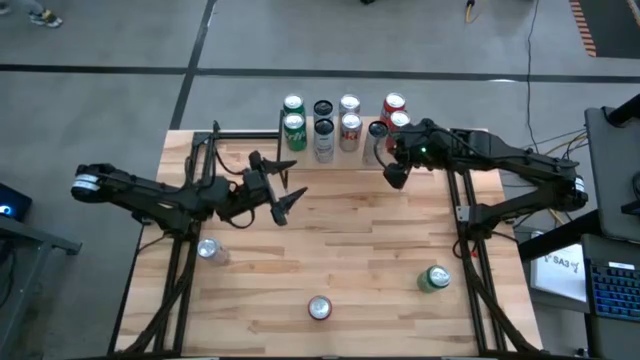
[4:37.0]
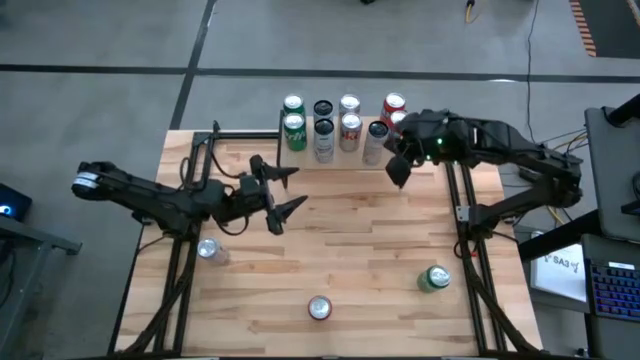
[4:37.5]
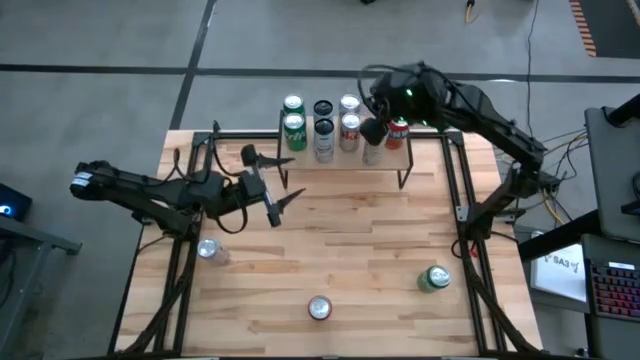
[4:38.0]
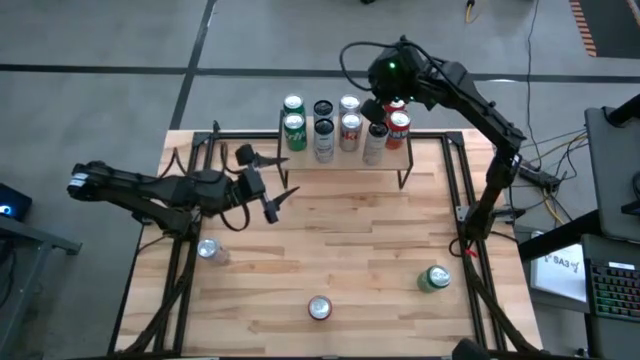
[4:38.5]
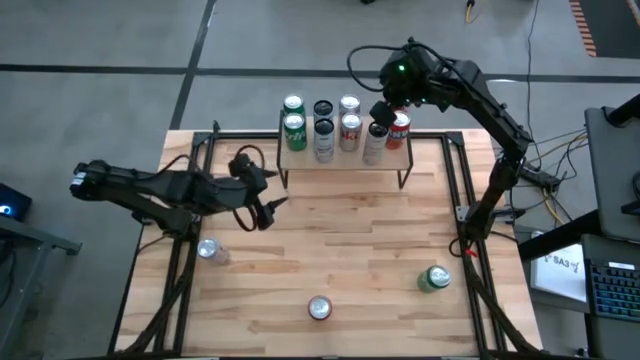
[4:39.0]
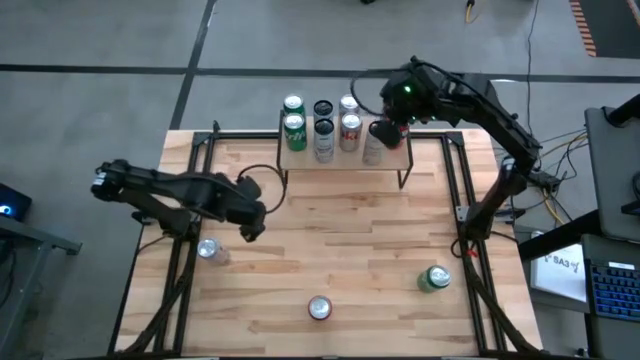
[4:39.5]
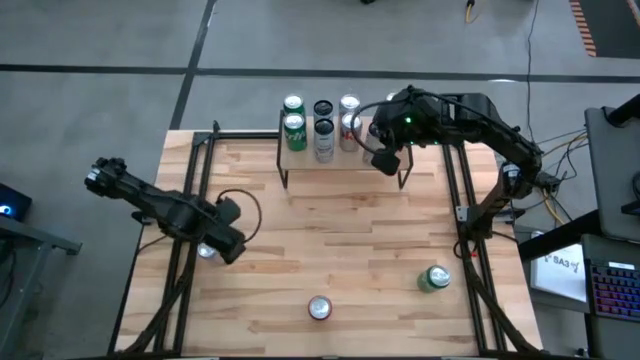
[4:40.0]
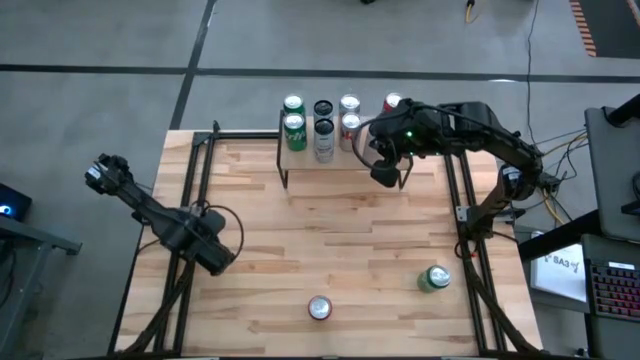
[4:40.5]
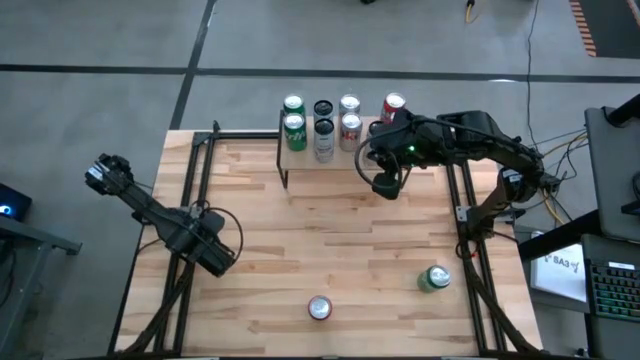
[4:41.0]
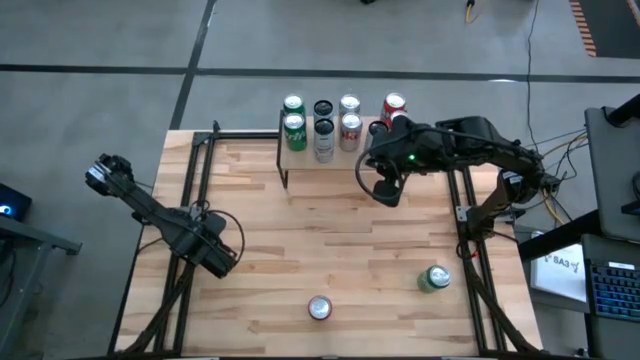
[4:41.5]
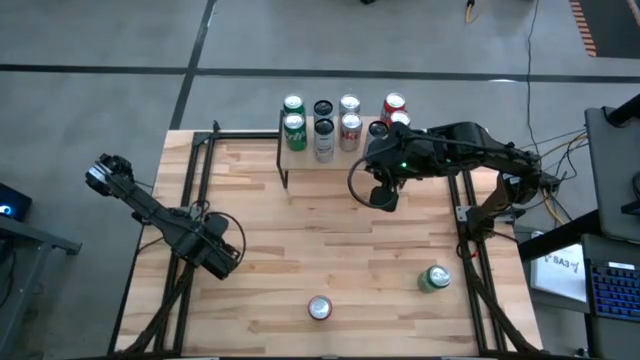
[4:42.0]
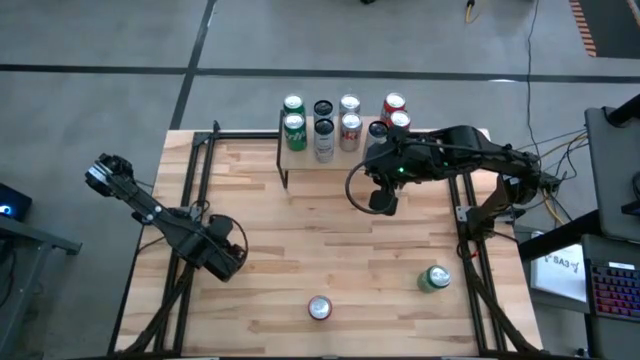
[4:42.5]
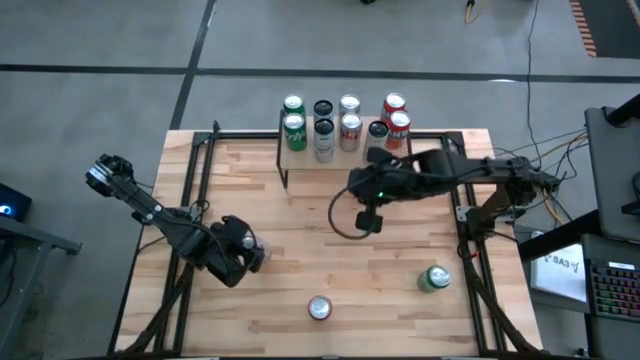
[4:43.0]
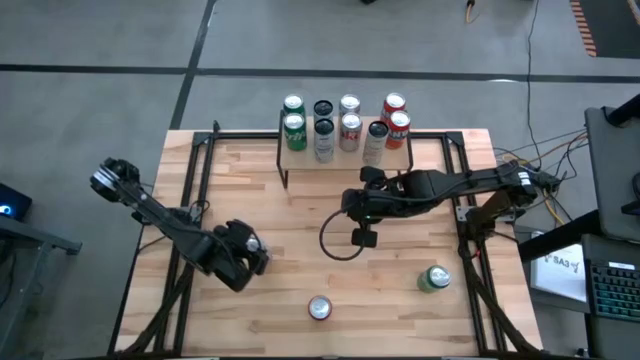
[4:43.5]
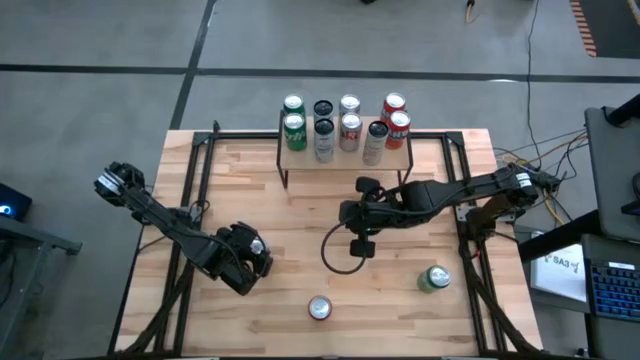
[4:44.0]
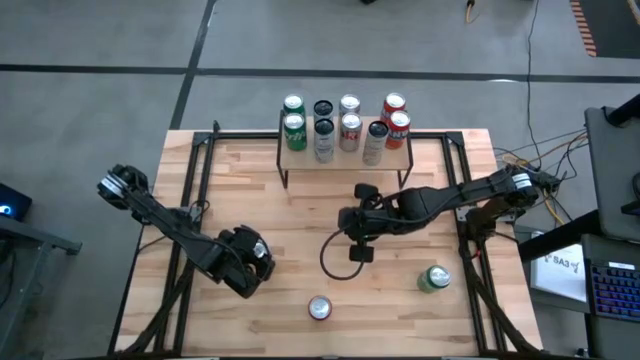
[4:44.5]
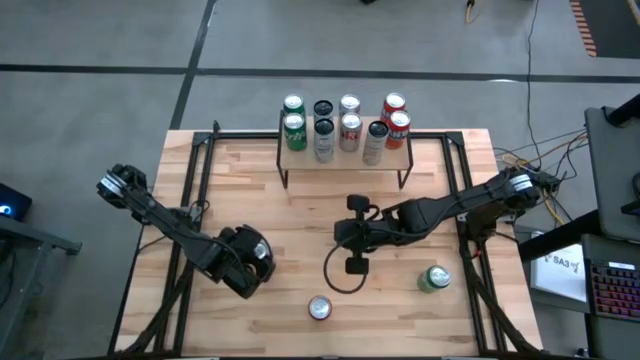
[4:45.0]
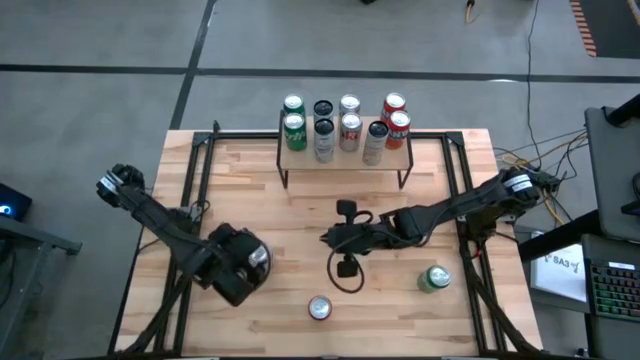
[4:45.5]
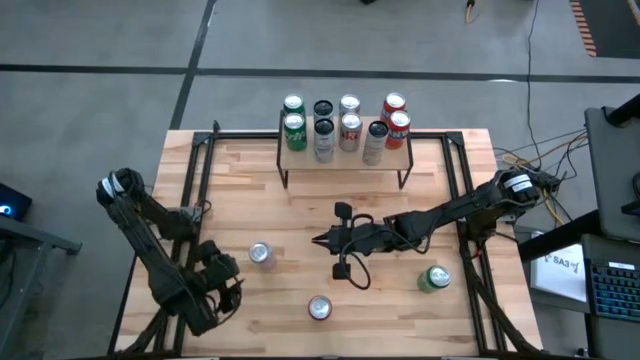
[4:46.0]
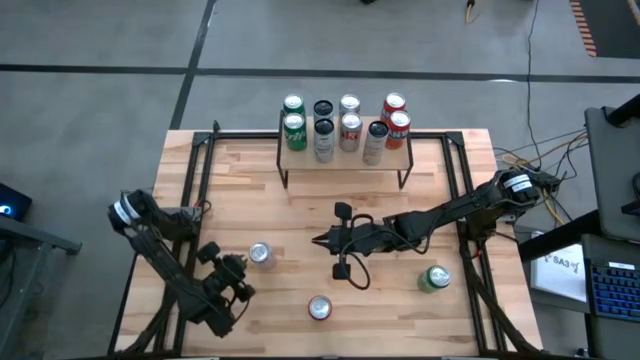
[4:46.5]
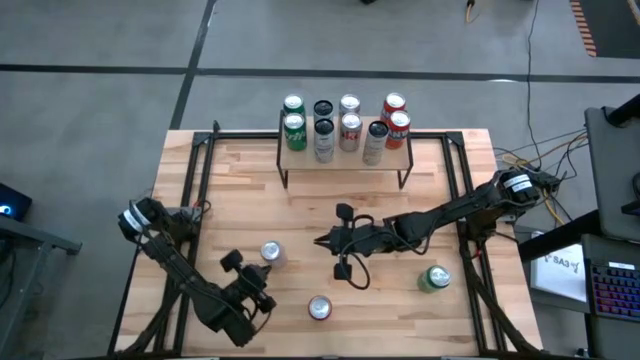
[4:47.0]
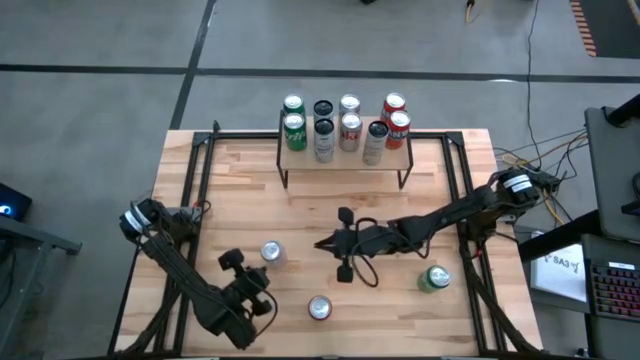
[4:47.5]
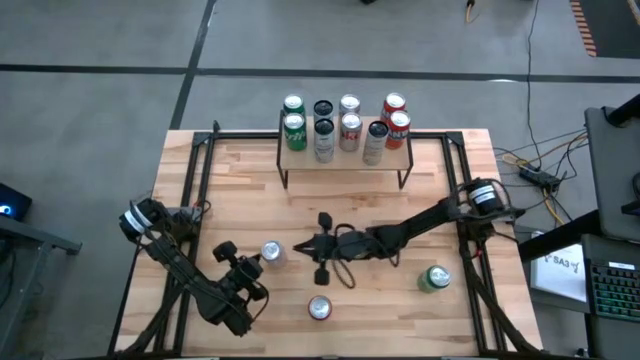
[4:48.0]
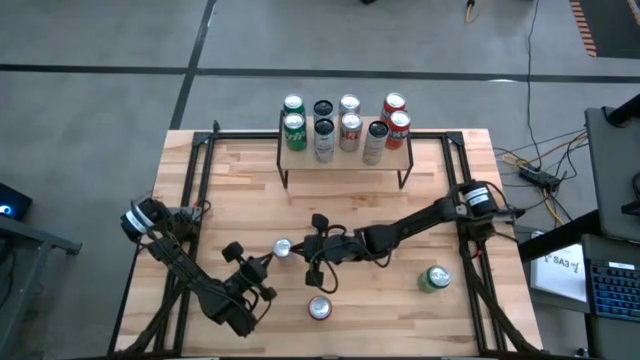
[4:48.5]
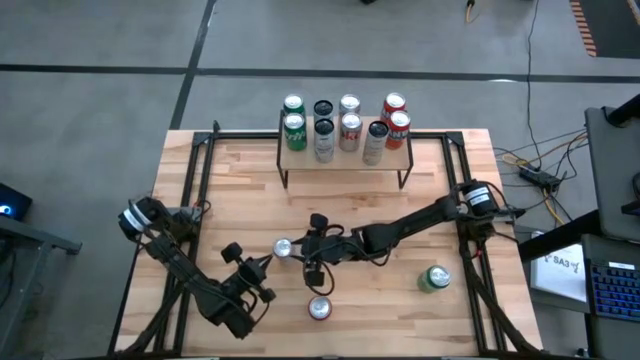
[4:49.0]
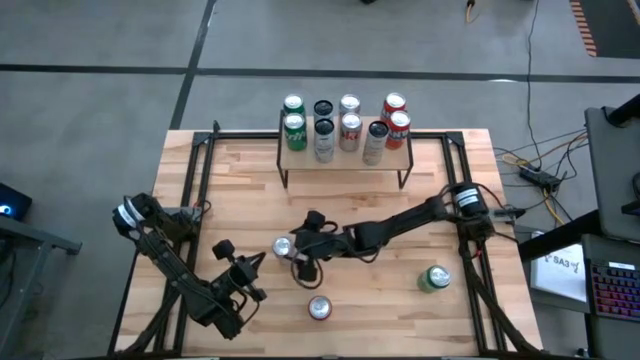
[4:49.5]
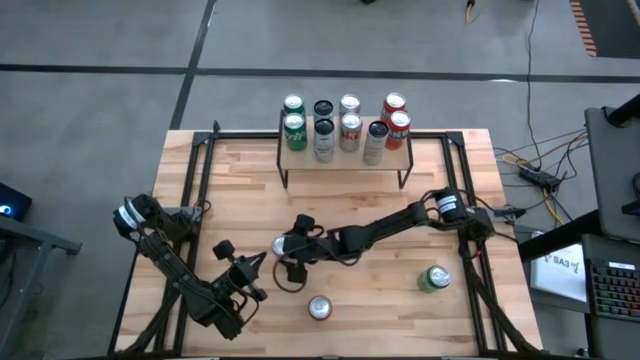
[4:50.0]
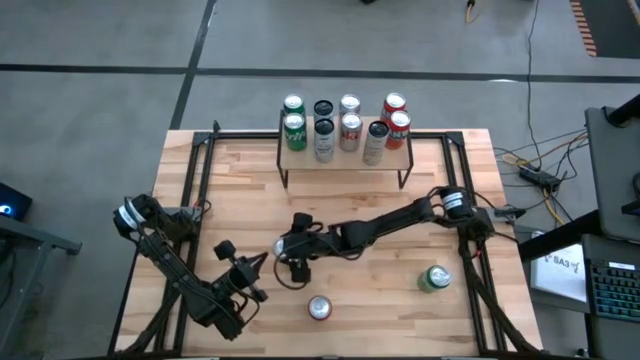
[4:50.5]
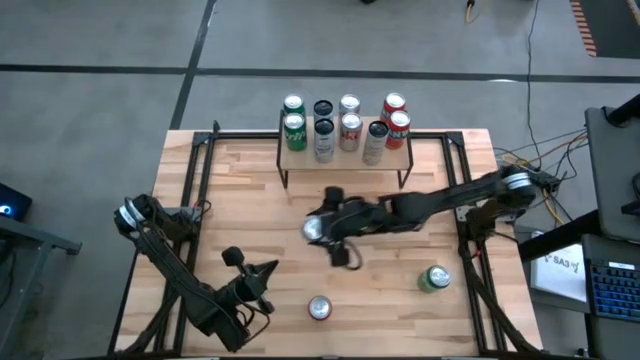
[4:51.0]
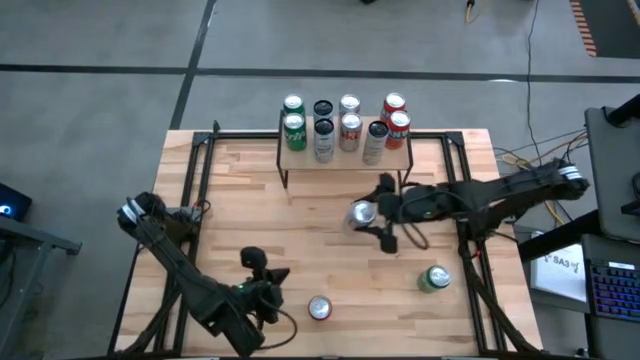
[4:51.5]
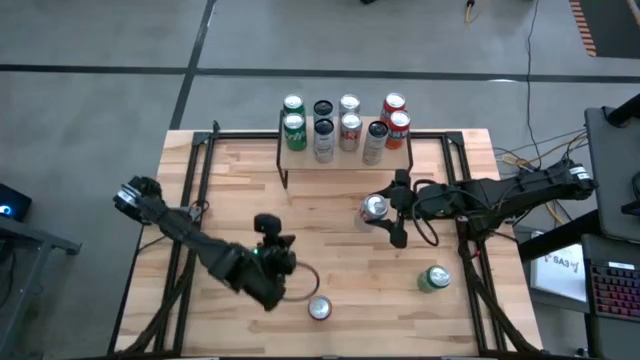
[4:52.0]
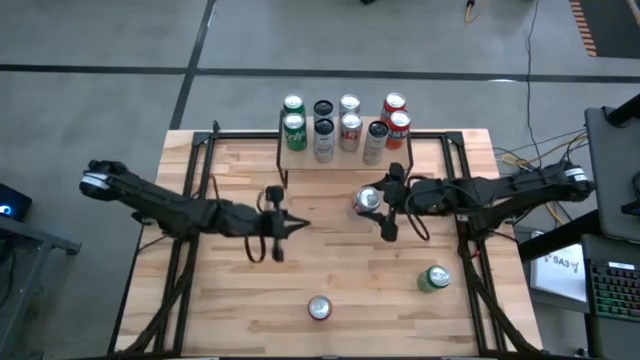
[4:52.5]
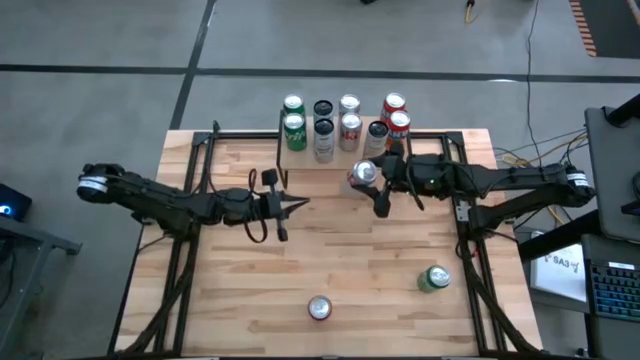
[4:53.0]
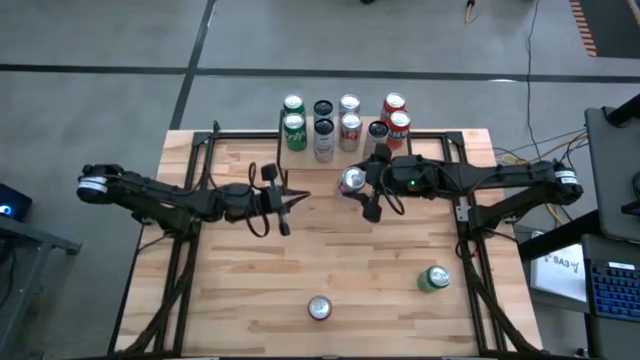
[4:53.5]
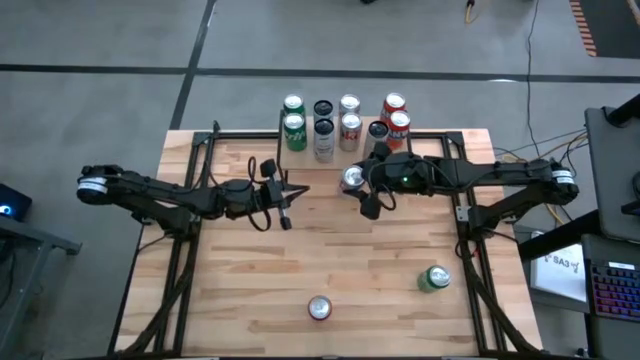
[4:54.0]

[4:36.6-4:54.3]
Task: Place canned beverage on shelf
Put the white red soda can on the shelf aligned with the other white red soda cans
